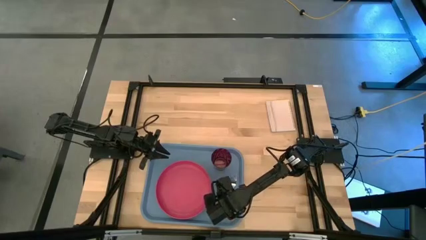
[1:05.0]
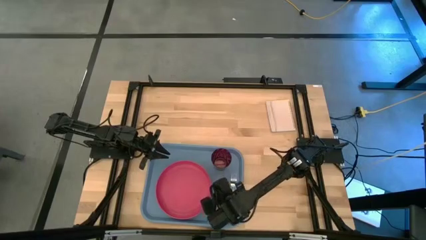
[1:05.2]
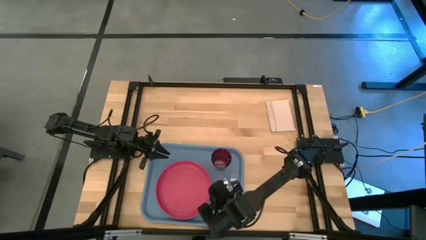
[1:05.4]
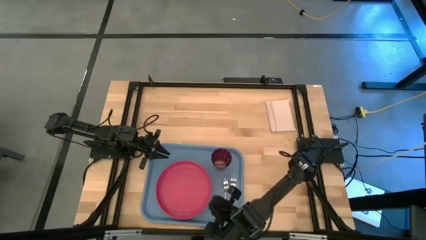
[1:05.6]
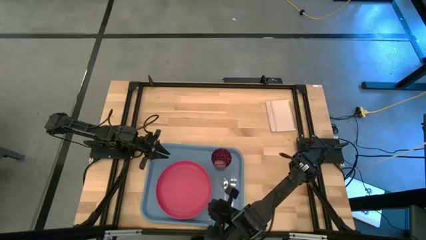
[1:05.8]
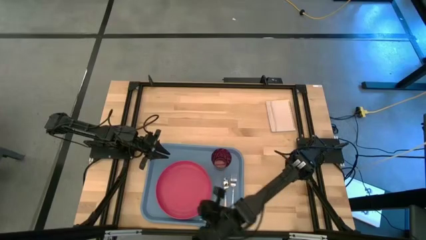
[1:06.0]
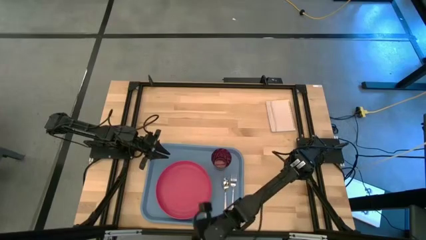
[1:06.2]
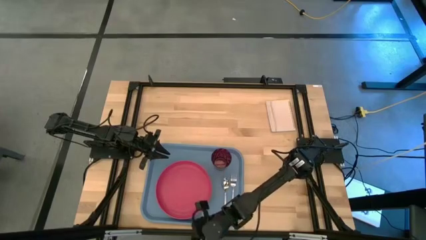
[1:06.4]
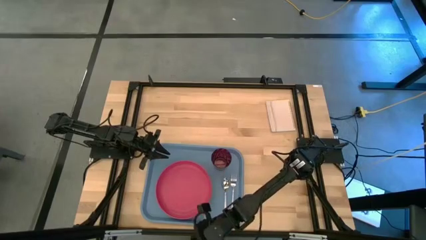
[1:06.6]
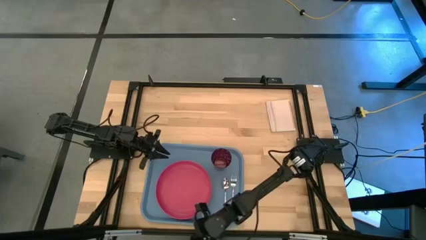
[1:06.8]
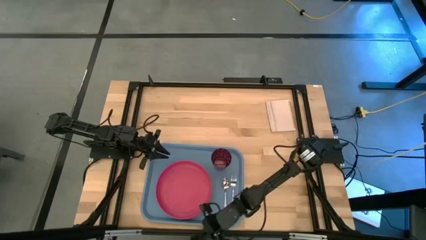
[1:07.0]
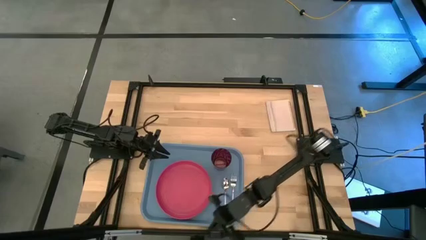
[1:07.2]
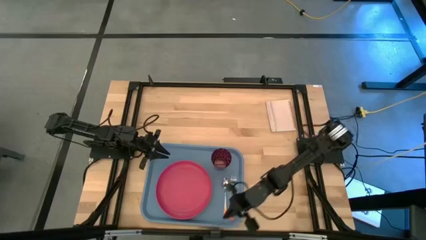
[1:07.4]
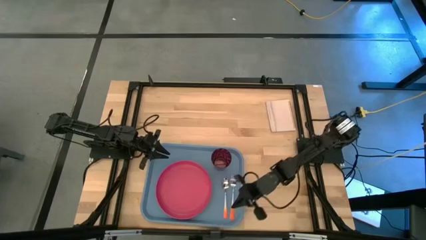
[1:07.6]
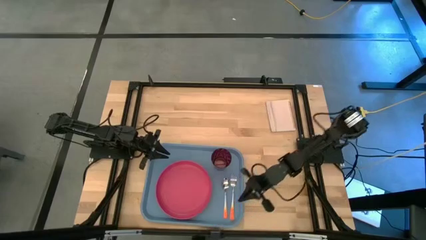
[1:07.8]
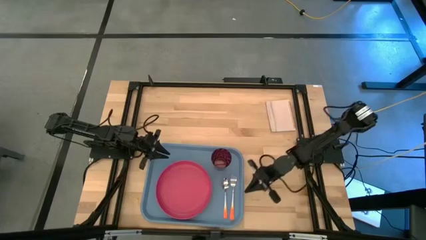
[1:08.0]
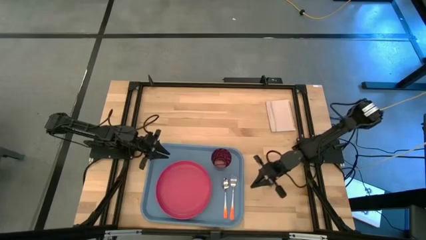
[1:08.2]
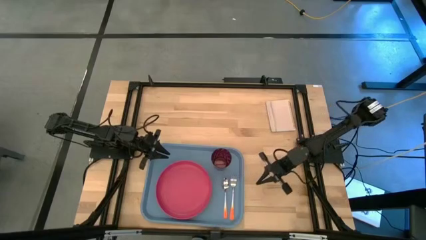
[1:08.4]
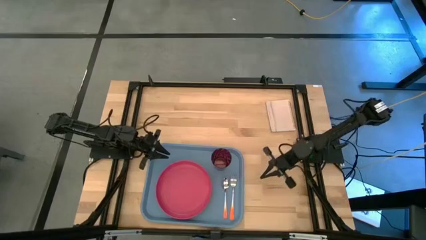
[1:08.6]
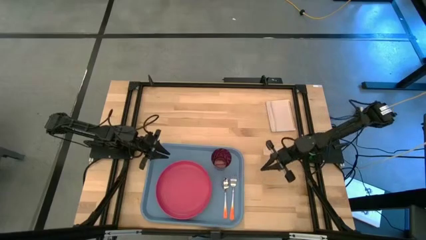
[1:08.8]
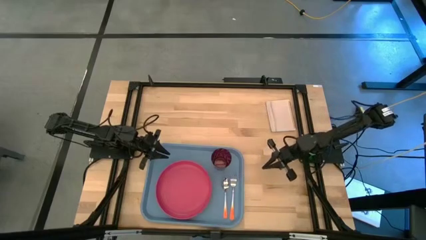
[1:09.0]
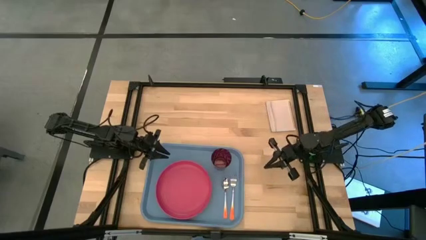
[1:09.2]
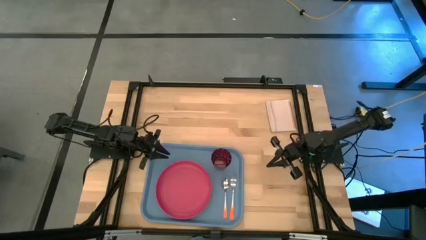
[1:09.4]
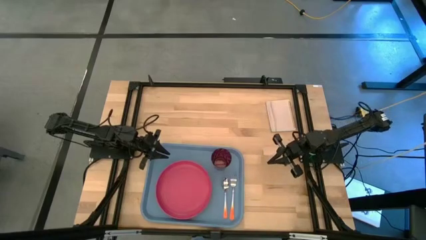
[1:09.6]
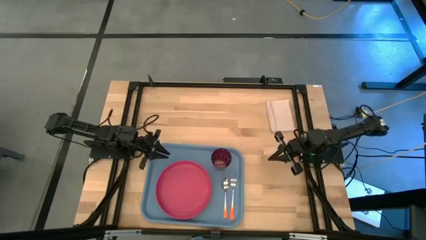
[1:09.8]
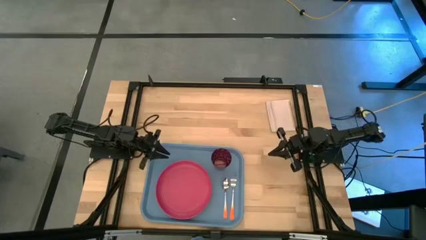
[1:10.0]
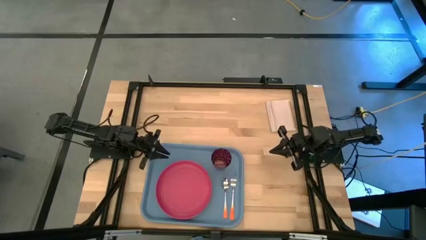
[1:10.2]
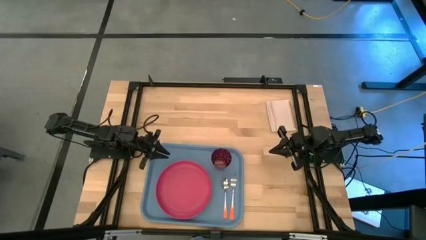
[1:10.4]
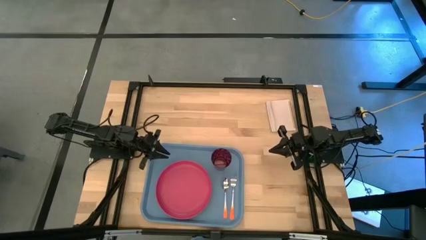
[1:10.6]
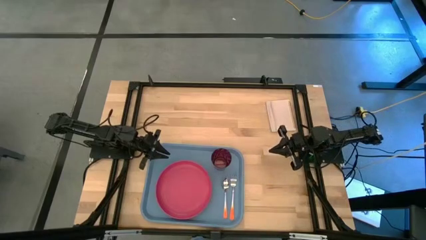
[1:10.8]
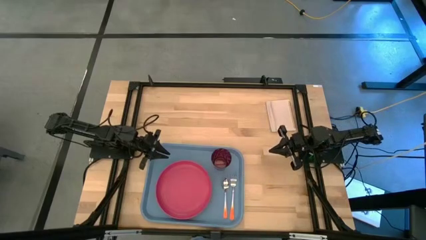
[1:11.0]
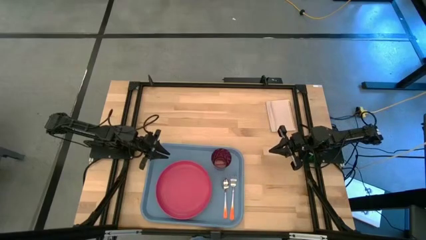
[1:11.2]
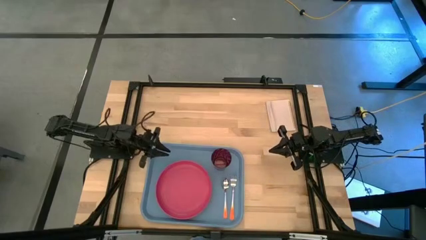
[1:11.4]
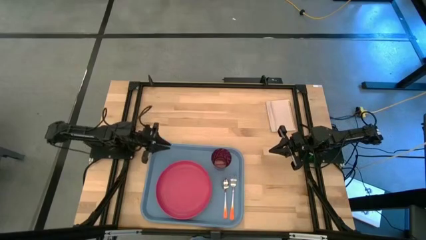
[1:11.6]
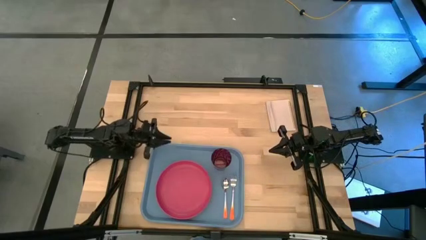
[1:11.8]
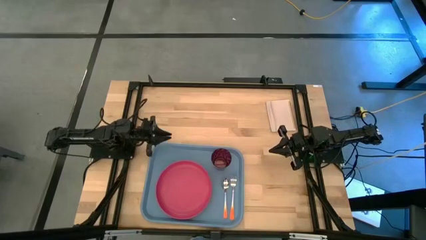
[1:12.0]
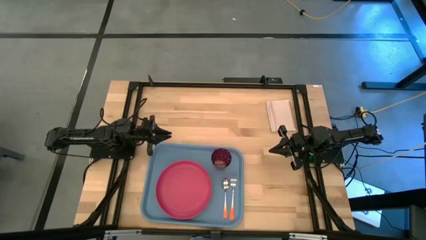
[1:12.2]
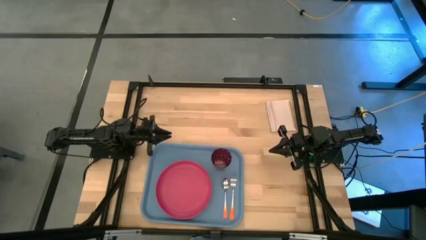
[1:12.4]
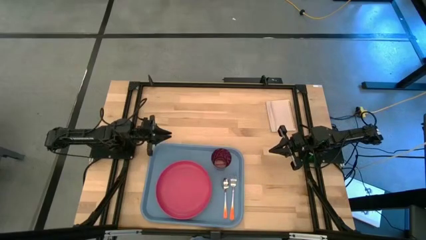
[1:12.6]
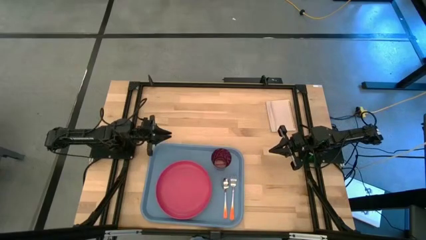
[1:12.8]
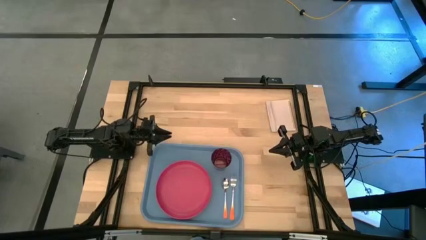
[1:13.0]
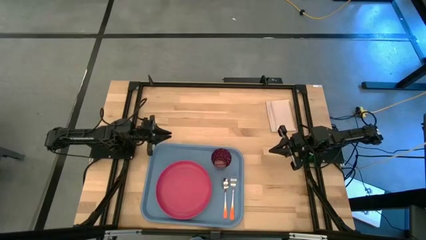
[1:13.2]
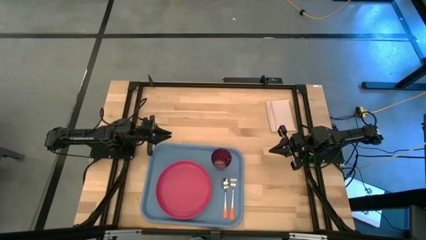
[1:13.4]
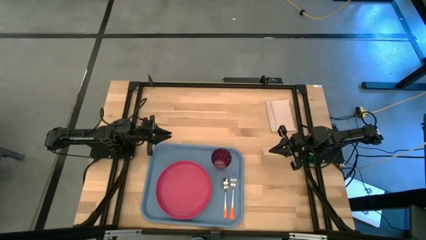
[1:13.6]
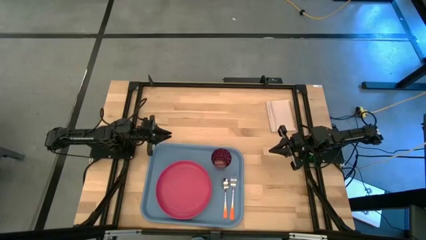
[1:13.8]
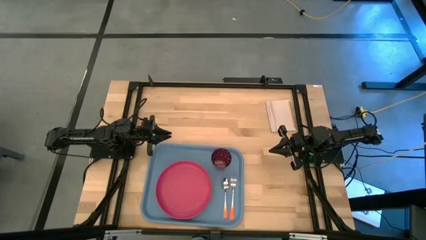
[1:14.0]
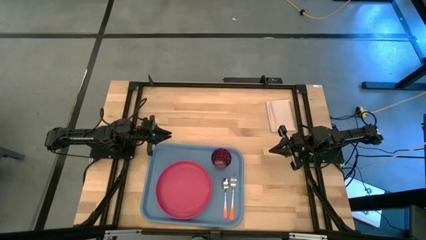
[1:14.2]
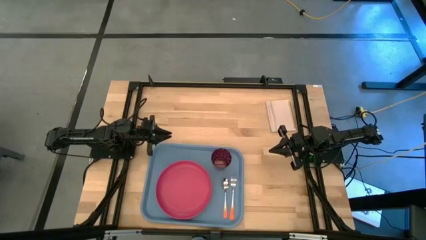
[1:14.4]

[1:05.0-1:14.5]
Task: Pick and place plate/cup/fork/spoon on tray
Return to Home Position

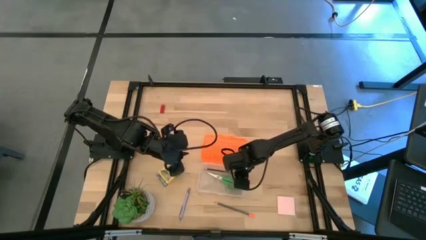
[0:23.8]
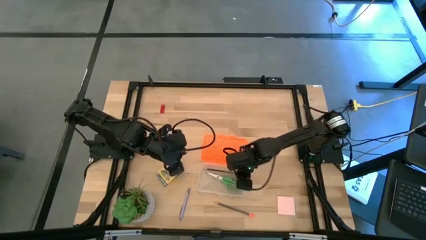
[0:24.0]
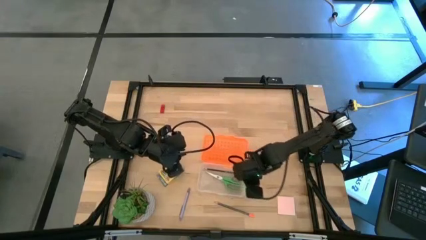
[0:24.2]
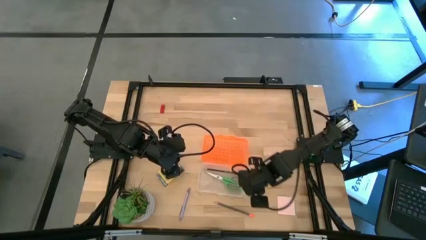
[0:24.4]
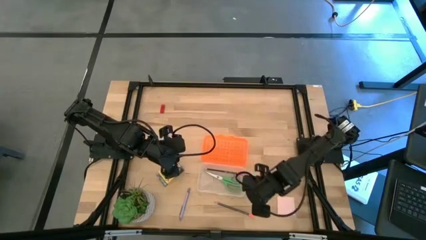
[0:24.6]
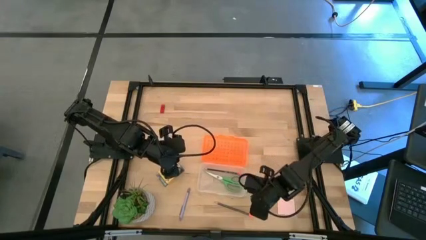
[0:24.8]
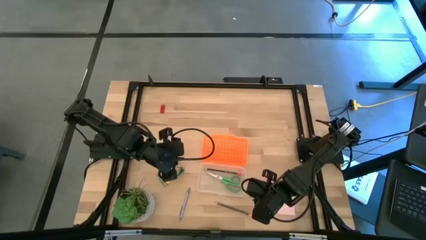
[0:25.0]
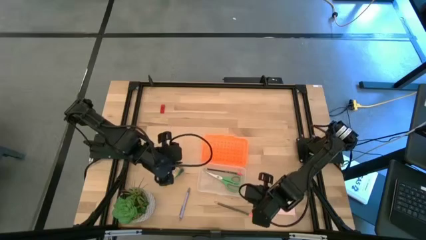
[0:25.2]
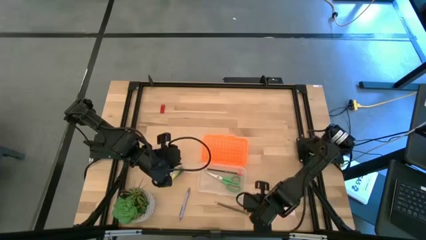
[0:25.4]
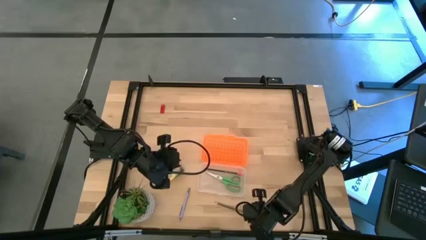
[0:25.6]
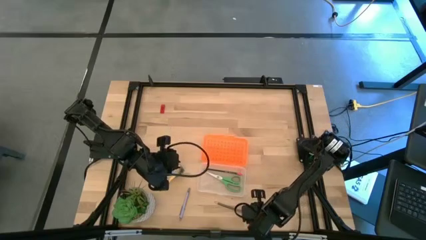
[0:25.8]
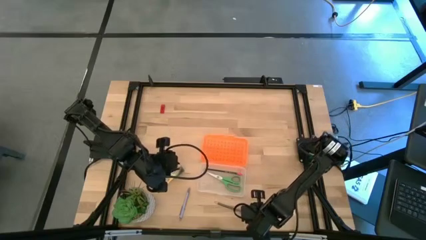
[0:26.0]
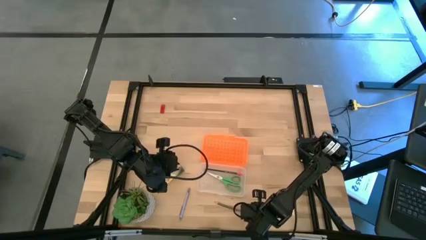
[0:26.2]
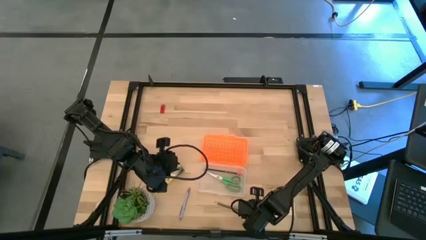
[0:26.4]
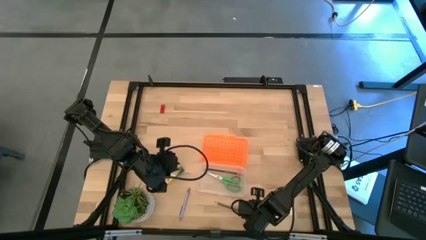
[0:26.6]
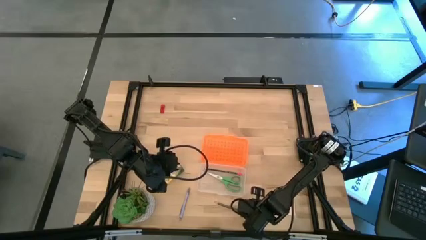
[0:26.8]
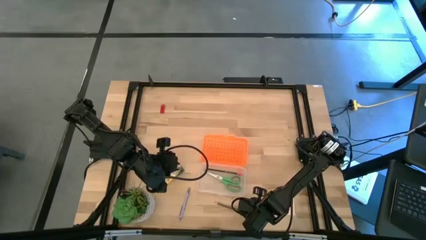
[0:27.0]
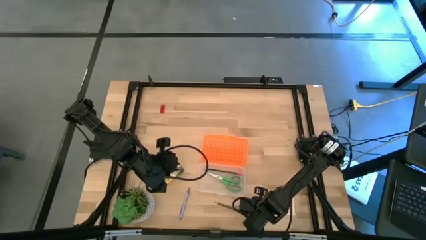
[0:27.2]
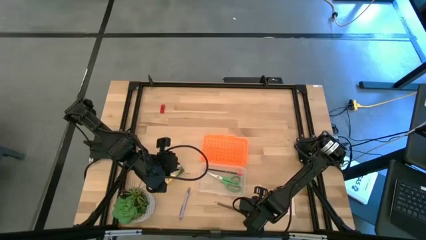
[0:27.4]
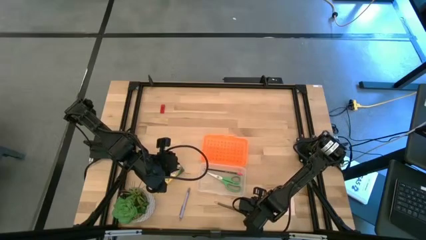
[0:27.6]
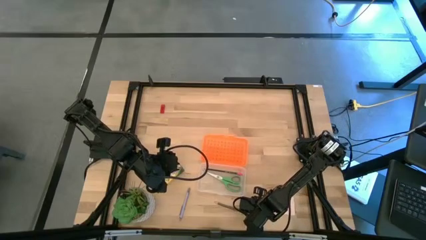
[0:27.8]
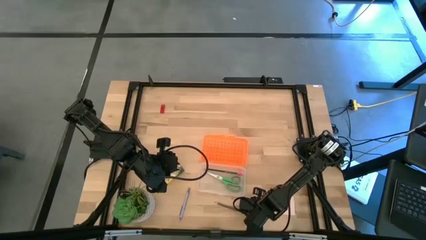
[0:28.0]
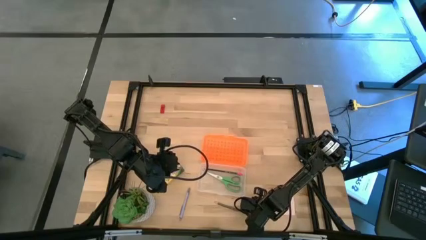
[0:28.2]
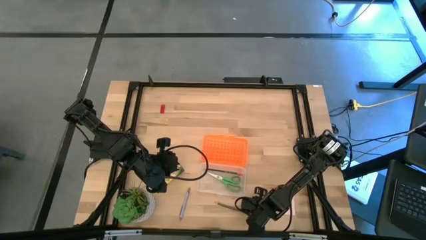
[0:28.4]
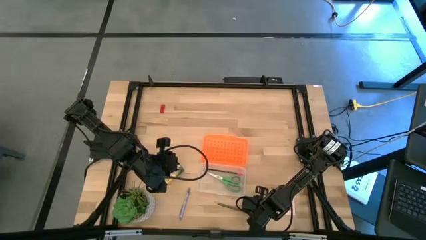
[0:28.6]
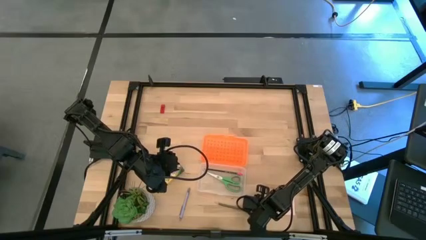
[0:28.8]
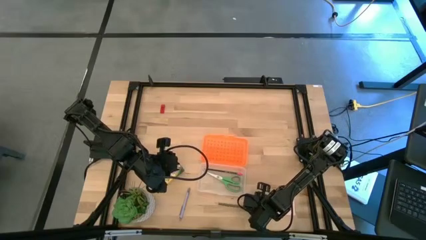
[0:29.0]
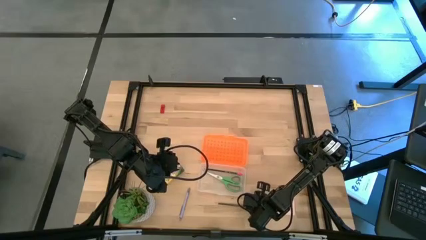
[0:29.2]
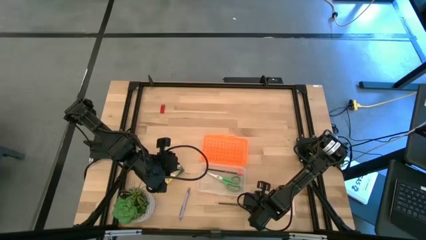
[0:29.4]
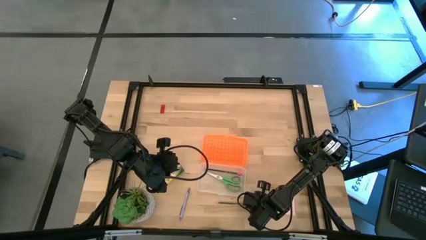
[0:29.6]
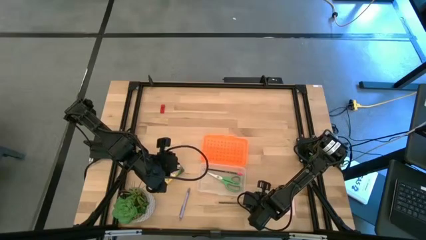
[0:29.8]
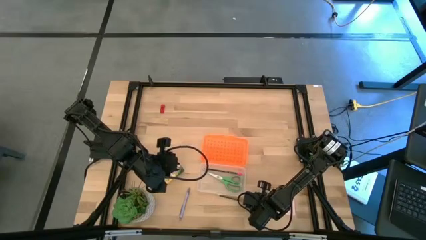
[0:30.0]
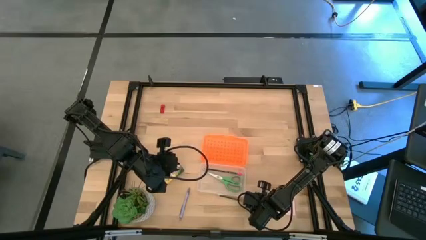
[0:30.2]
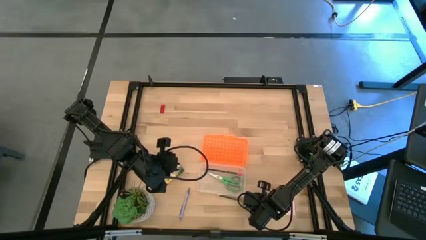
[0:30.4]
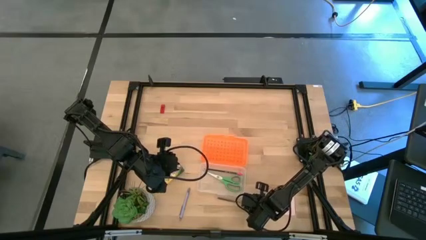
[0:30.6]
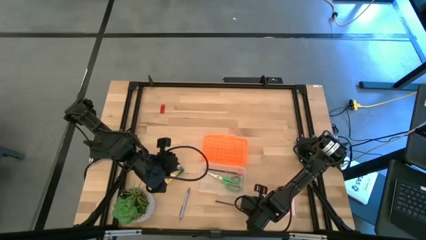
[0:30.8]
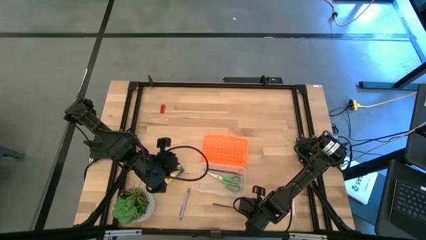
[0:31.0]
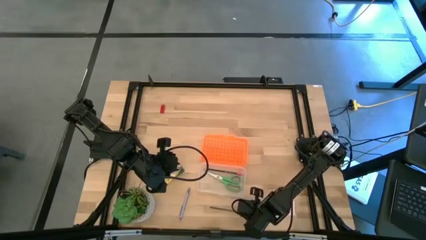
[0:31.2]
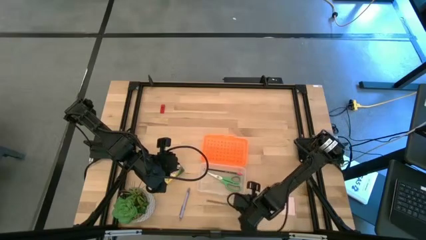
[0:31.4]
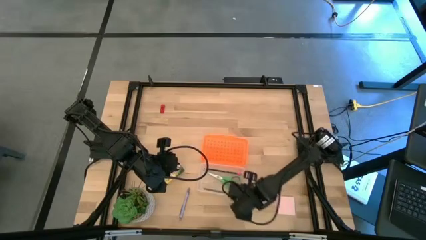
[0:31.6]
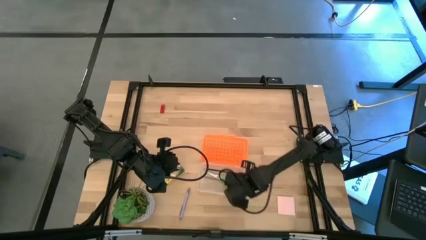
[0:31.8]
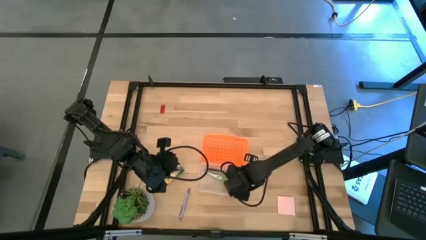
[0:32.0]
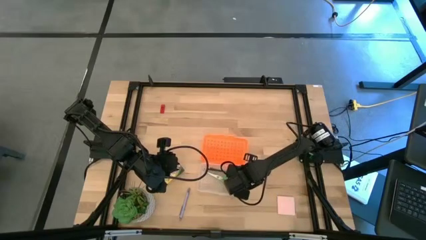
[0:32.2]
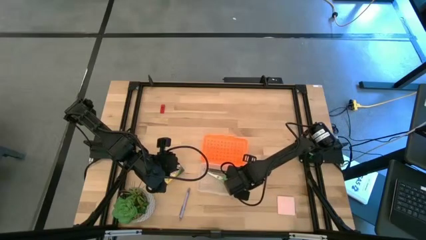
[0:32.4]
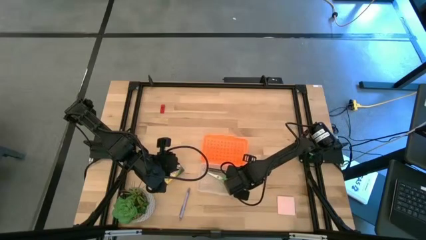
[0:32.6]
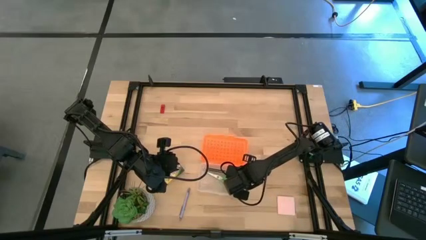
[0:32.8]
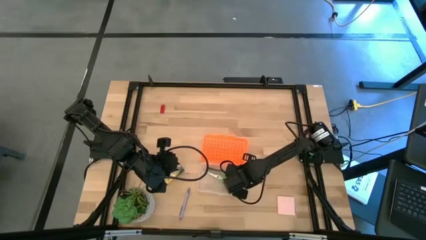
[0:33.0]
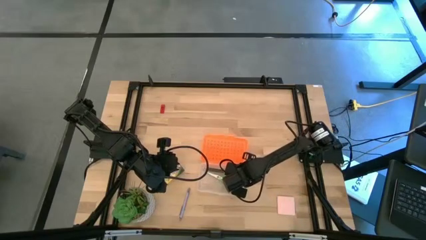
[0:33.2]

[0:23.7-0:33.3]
Task: Pack school essentials
Put the black pencil into the orange supply box
